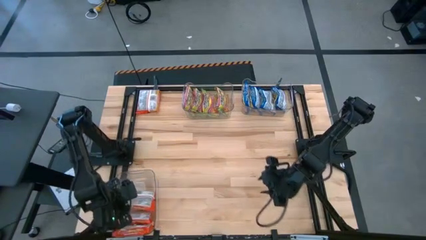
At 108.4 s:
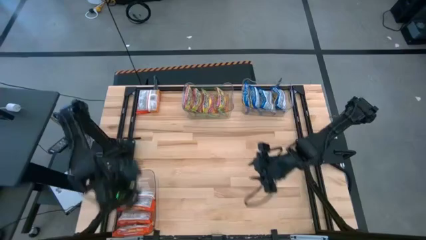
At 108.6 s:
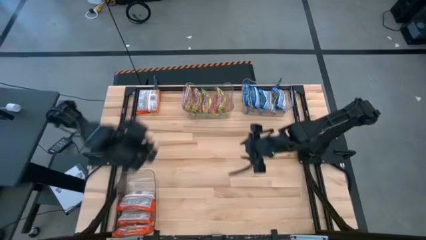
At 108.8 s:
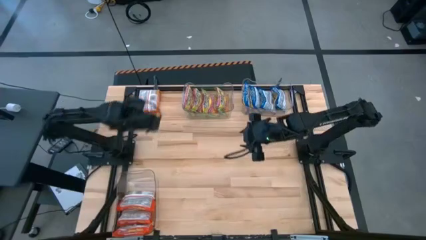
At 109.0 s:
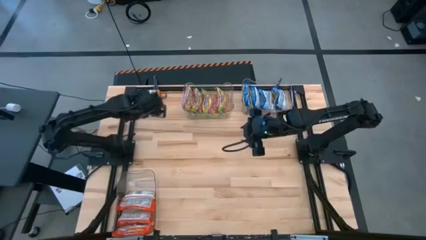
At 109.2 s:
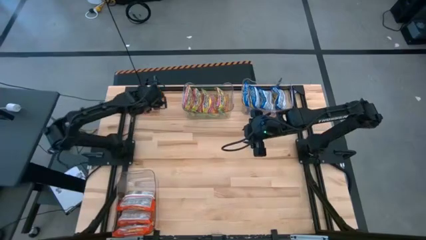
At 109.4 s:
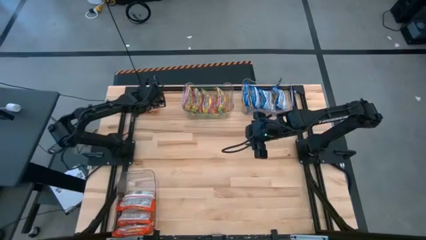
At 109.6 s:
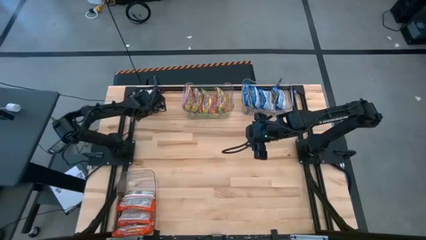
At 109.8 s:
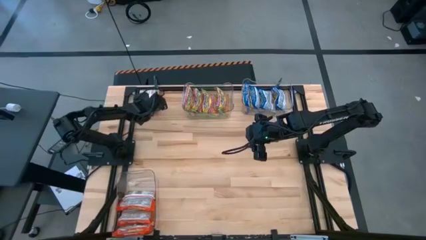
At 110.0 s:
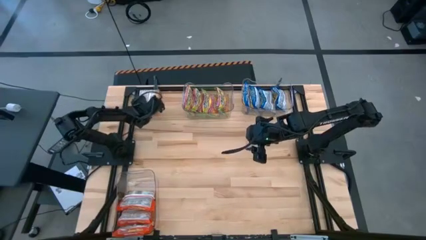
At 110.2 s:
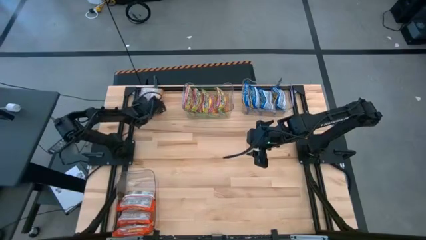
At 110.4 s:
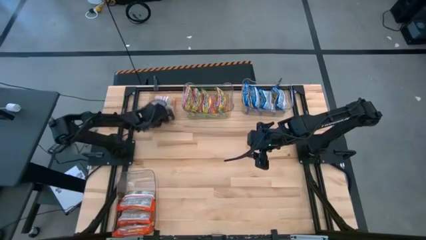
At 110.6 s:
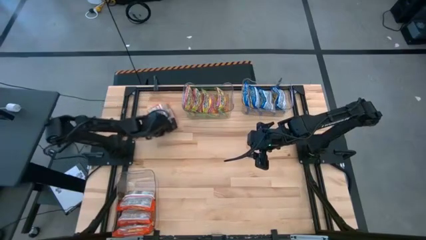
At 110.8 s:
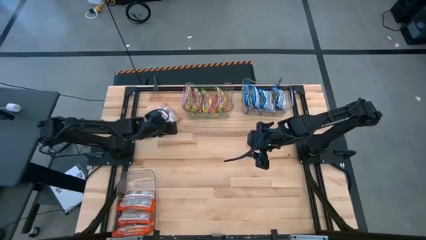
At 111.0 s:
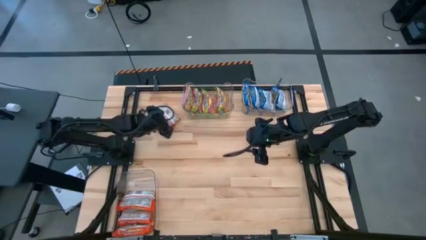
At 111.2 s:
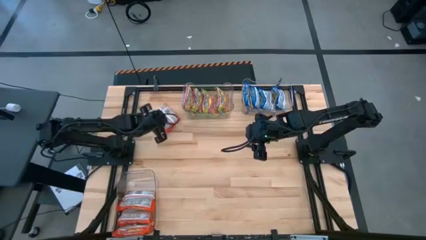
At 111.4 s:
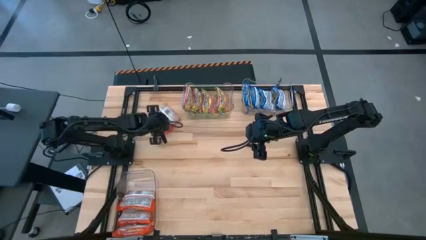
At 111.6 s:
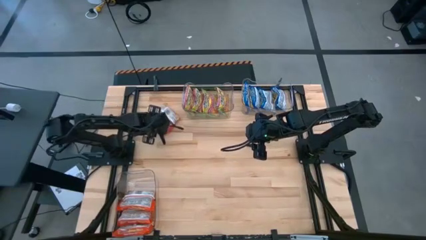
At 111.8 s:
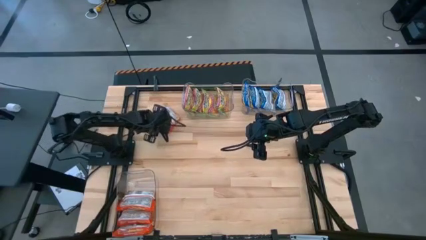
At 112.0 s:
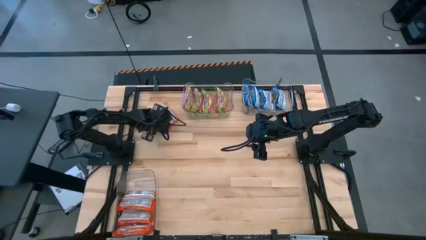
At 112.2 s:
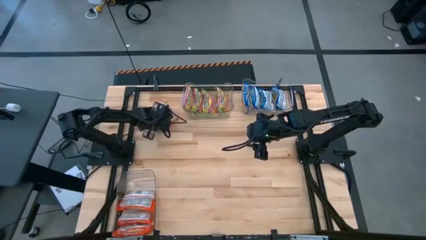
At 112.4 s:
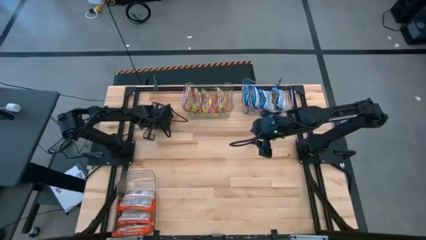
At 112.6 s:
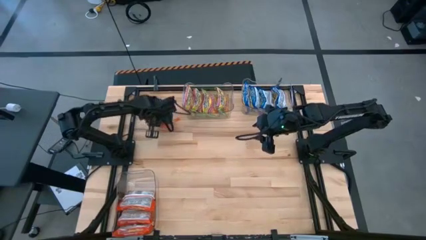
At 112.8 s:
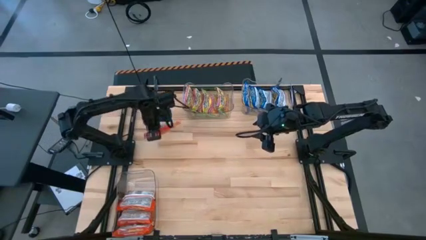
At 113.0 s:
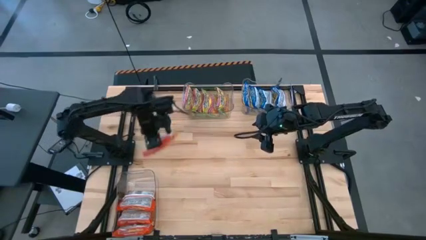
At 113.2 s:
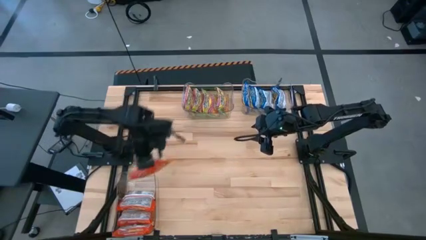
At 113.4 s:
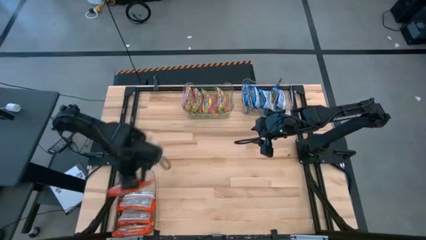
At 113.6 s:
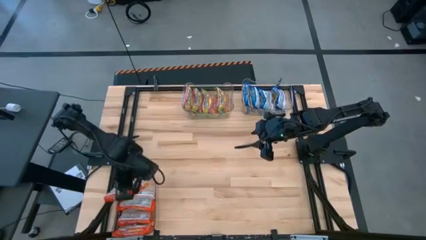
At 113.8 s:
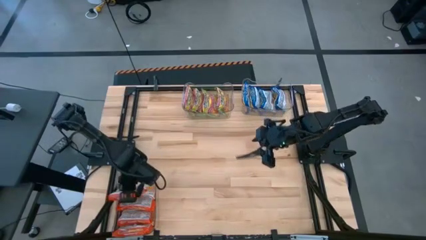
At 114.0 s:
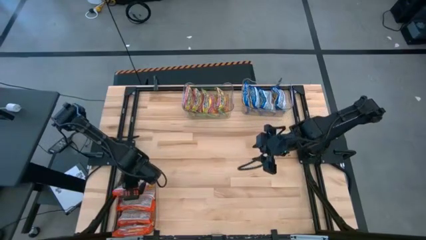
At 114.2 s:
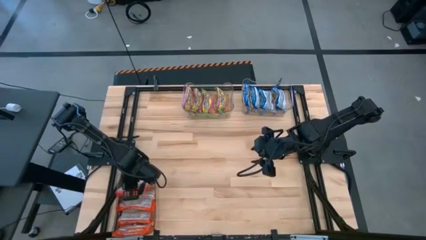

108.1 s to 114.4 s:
Task: Sort Maruchan noodles
Put the orange noodle pack into the bottom transparent bin

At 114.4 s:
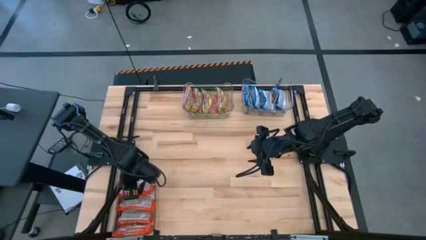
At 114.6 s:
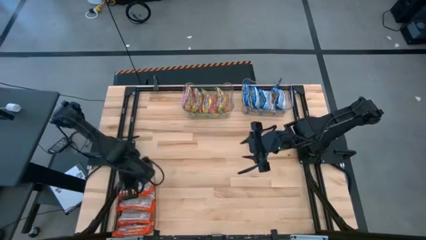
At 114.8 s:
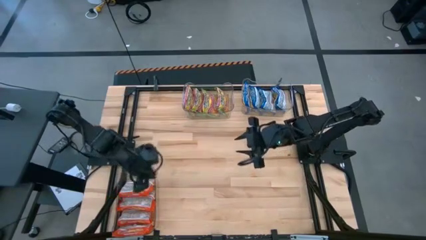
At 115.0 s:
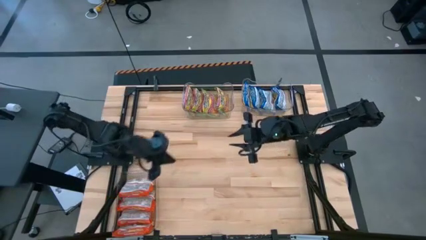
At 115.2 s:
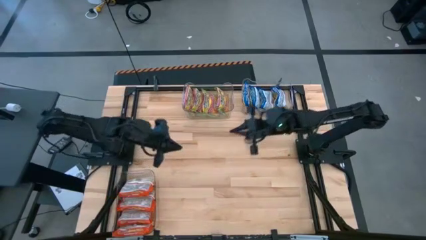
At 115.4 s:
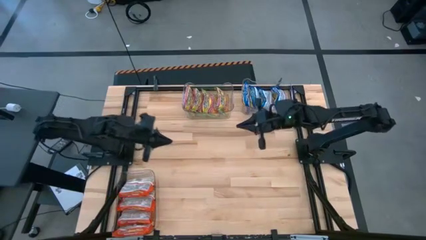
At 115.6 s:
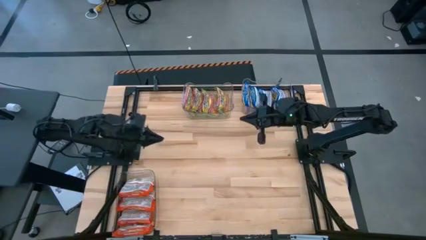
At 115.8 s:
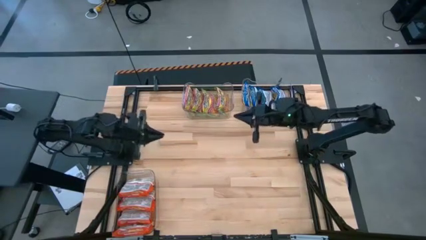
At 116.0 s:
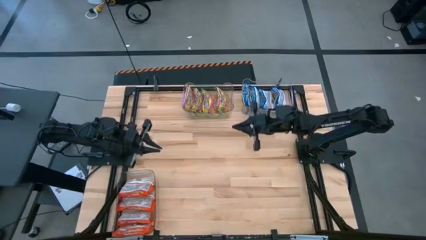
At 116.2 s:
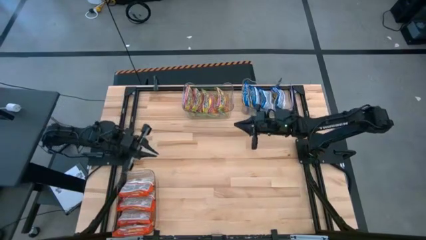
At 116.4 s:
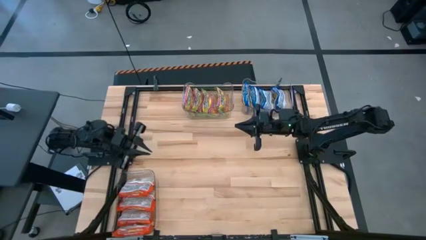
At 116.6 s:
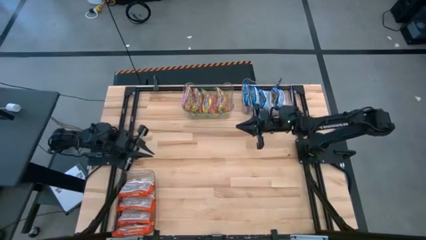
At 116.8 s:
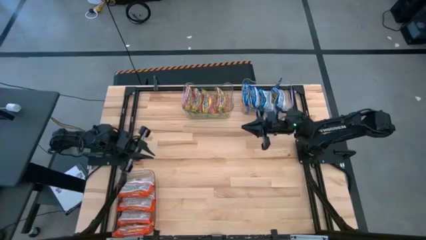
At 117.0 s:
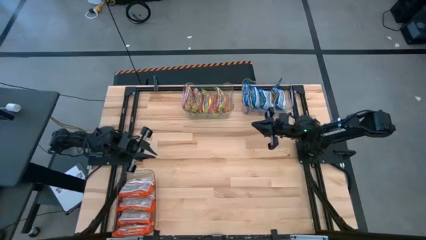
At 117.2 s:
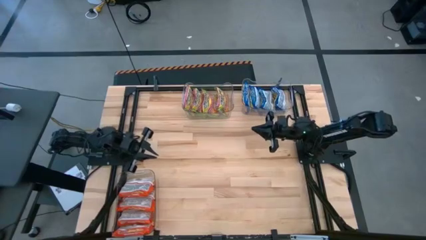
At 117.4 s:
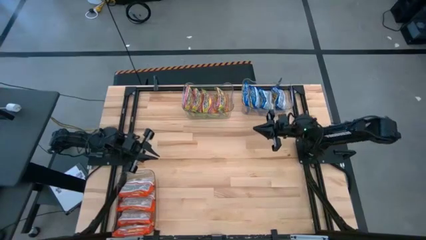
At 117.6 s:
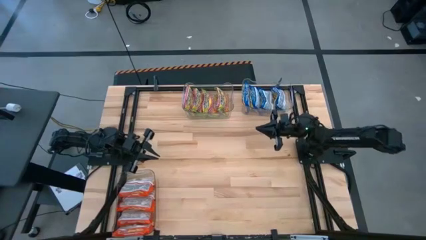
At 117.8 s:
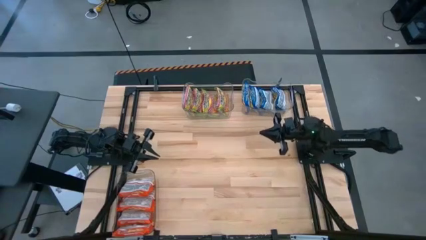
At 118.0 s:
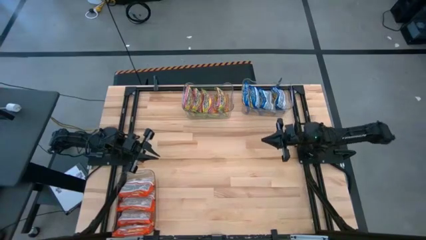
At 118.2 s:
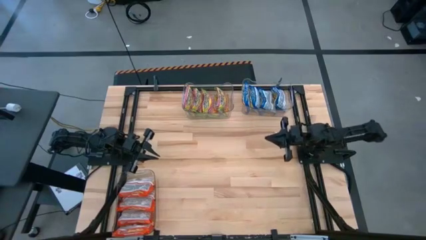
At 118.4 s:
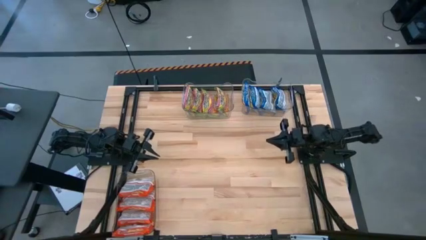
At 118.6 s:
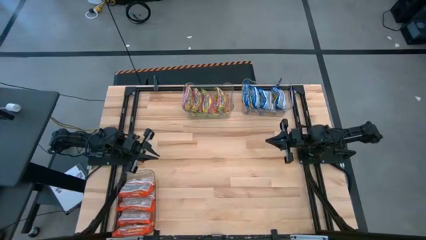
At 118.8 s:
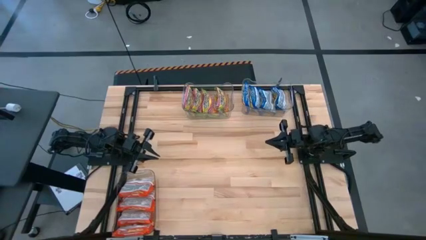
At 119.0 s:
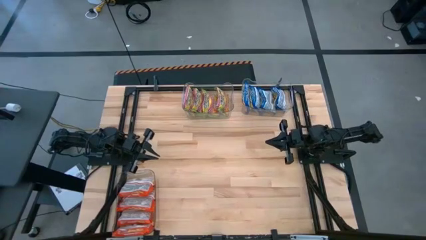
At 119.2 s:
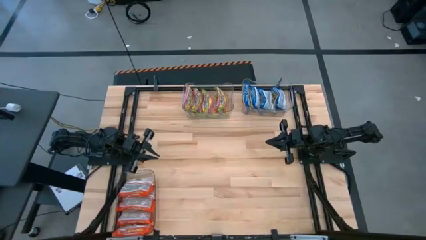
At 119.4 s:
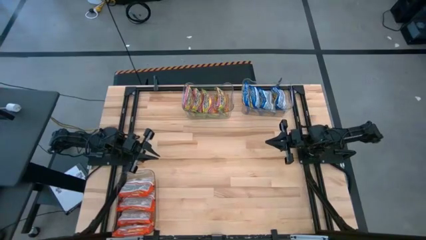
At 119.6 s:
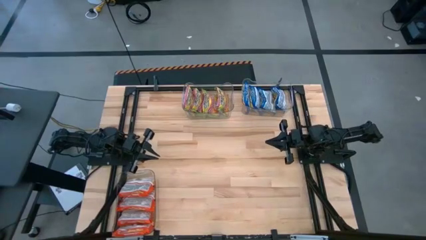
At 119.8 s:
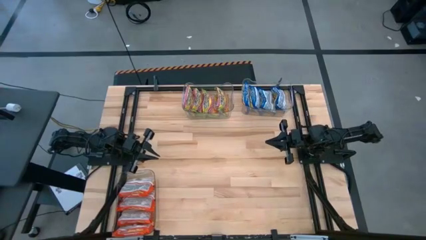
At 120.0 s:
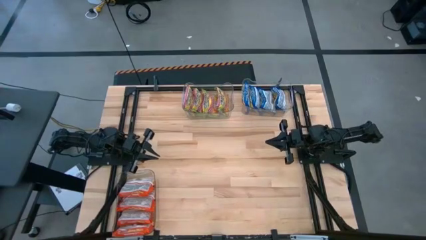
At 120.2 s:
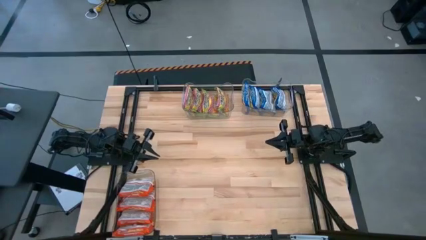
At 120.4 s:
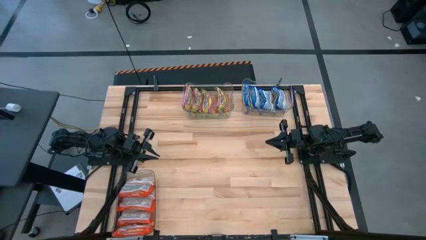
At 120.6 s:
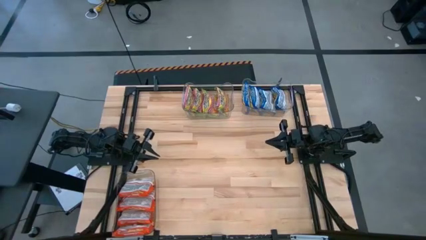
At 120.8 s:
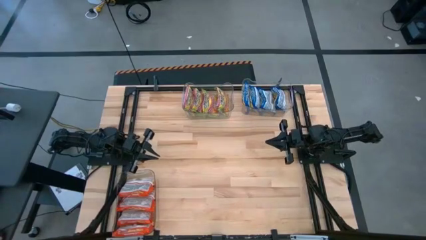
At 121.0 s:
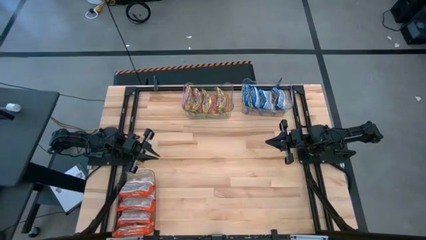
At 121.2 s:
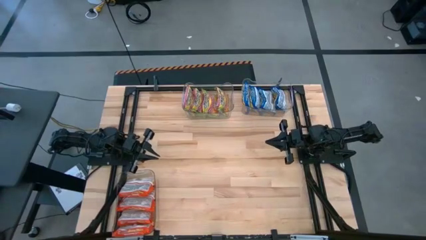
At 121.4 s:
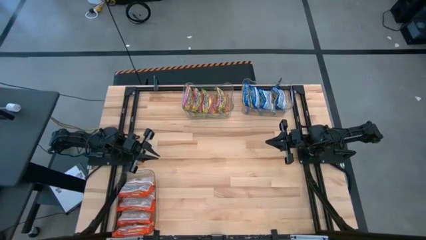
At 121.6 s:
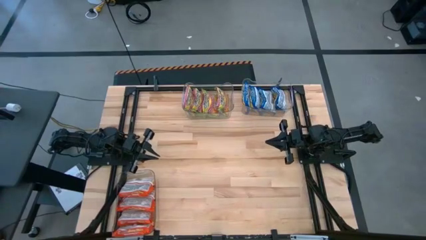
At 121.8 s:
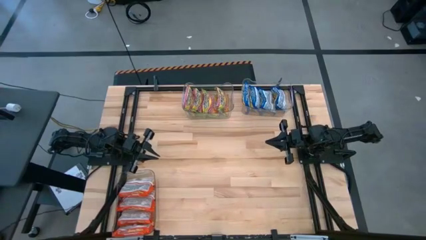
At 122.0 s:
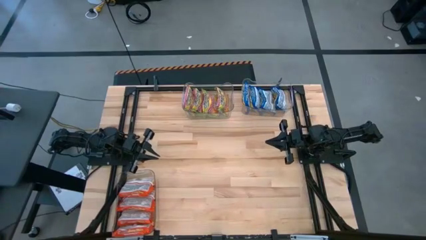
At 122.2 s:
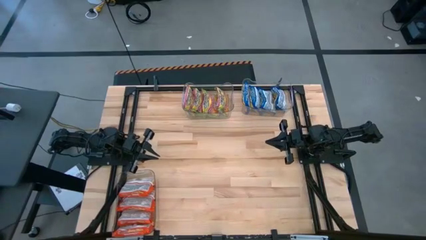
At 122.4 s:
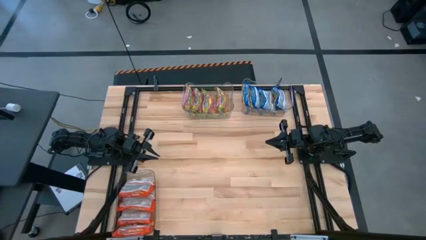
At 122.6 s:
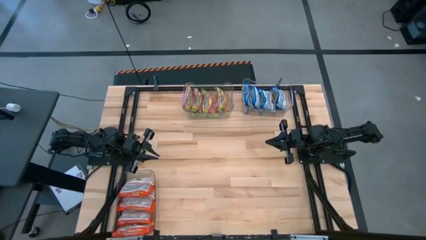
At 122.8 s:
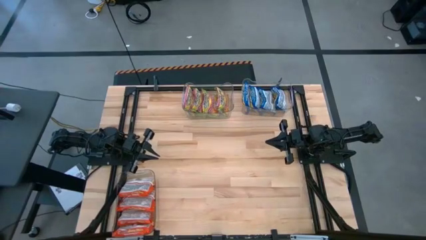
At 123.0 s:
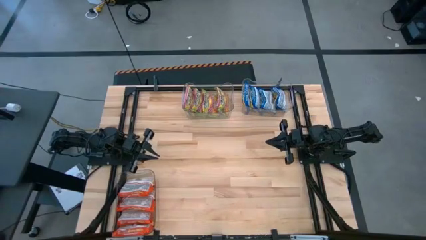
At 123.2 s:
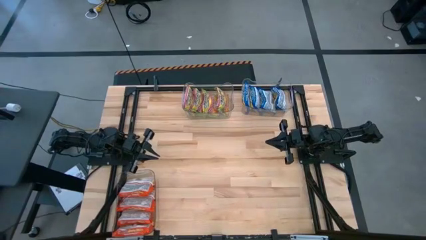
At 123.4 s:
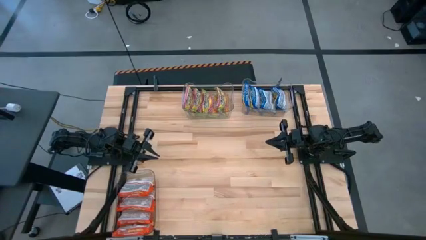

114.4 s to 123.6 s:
Return to Home Position

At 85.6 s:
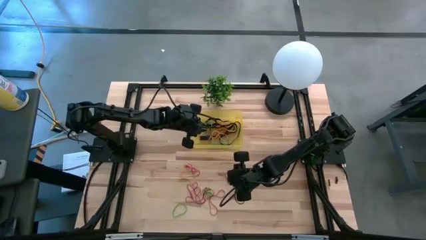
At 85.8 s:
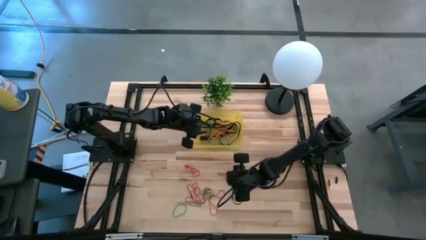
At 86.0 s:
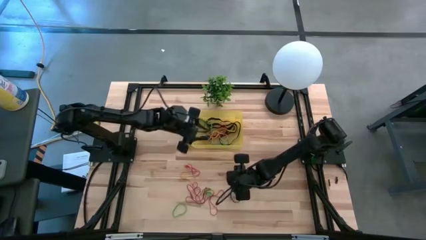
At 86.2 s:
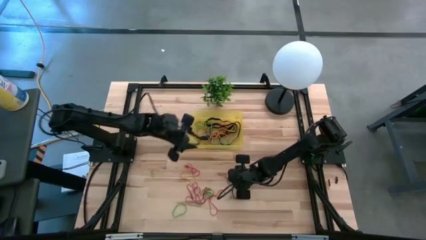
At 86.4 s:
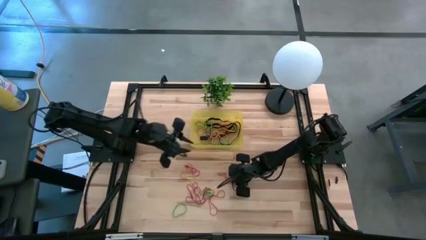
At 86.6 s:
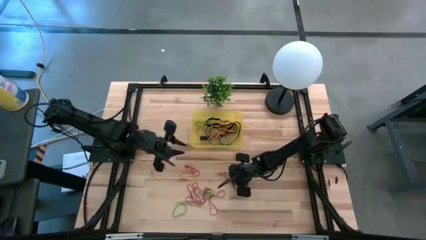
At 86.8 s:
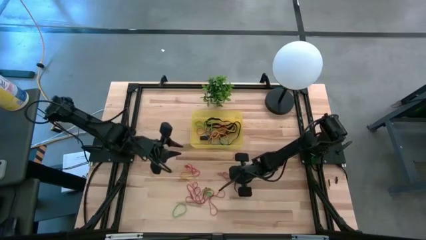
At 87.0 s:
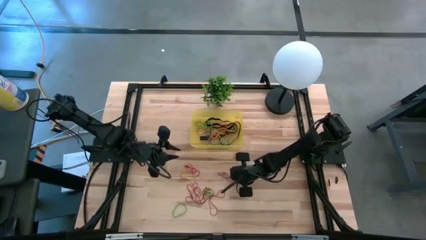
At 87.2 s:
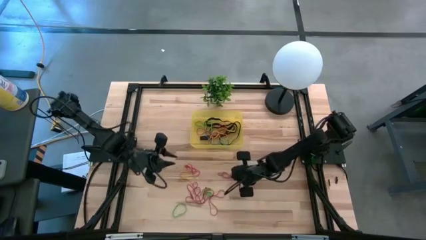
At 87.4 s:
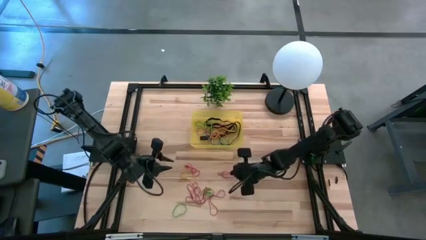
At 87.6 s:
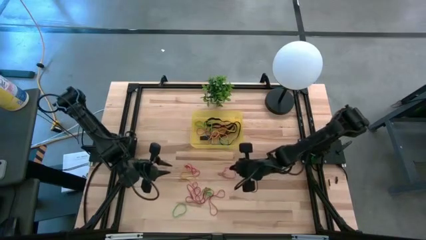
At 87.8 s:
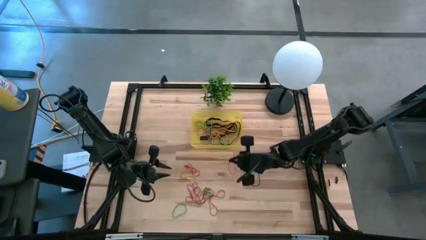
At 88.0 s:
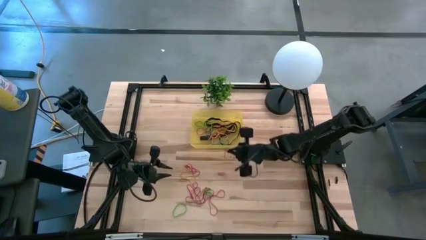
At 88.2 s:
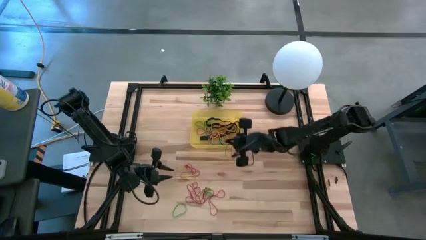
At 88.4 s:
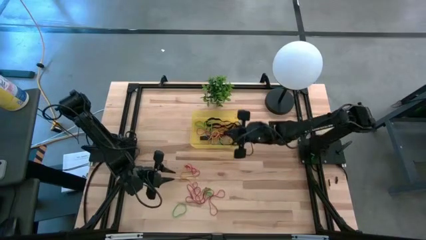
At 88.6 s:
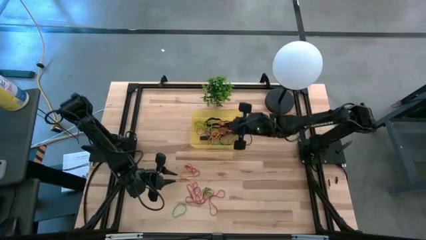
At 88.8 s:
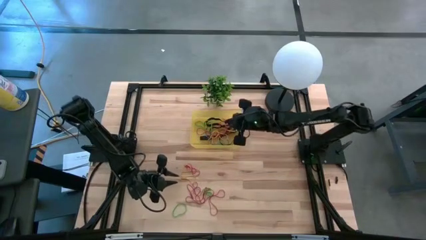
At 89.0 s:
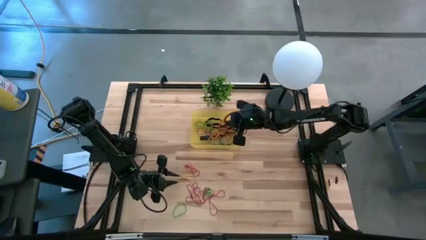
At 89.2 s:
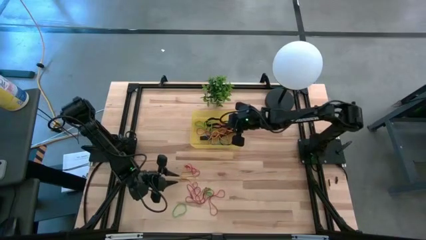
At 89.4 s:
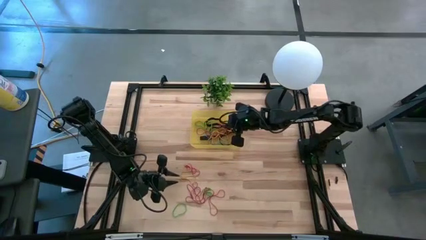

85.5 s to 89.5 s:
Task: Pick and place rubber bands into bin
Put the red rubber band into the yellow bin
